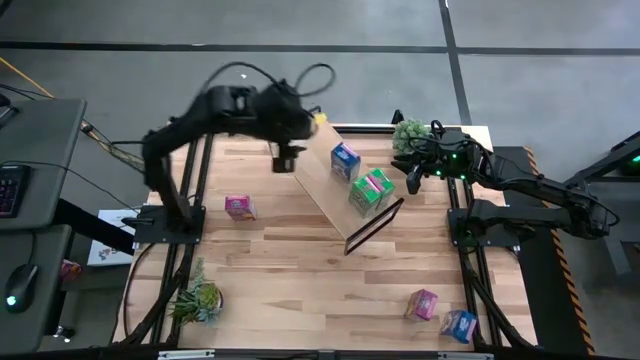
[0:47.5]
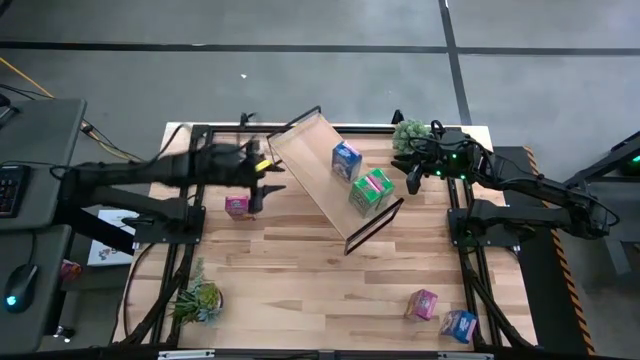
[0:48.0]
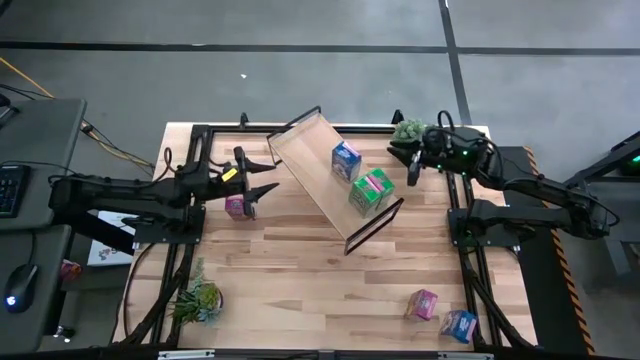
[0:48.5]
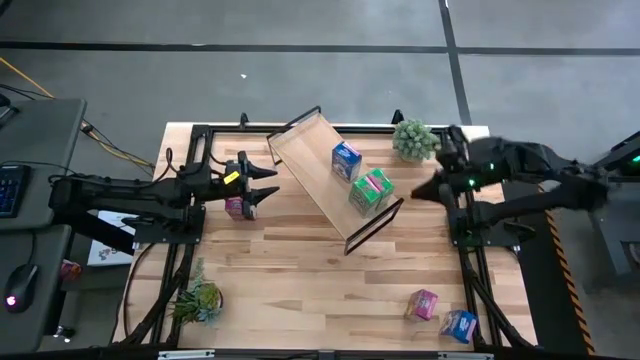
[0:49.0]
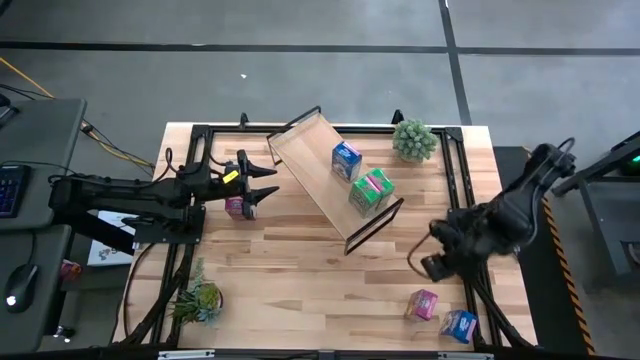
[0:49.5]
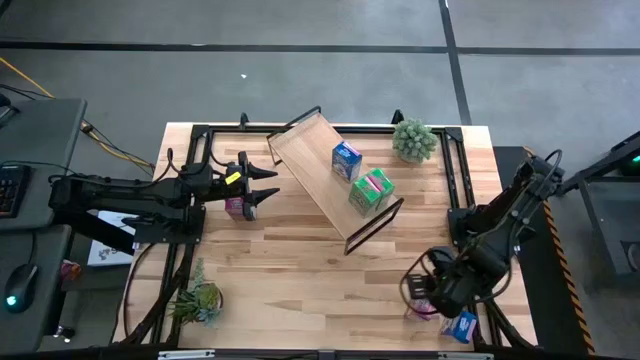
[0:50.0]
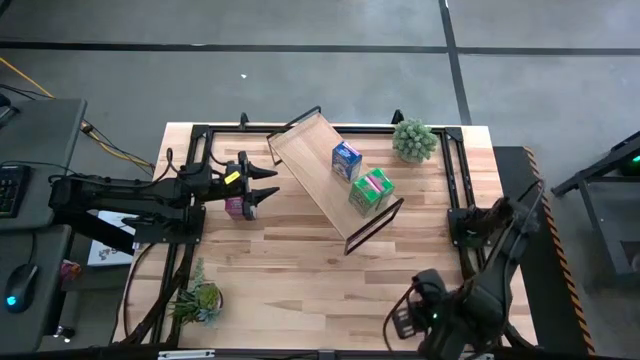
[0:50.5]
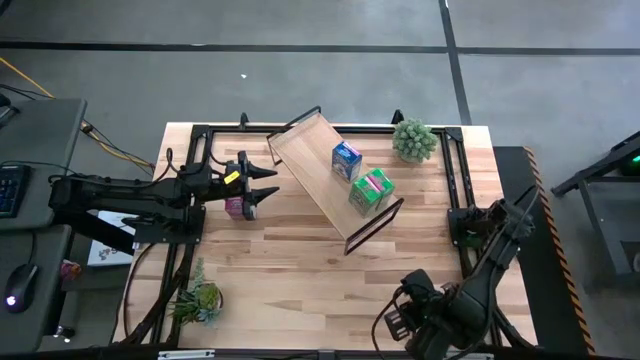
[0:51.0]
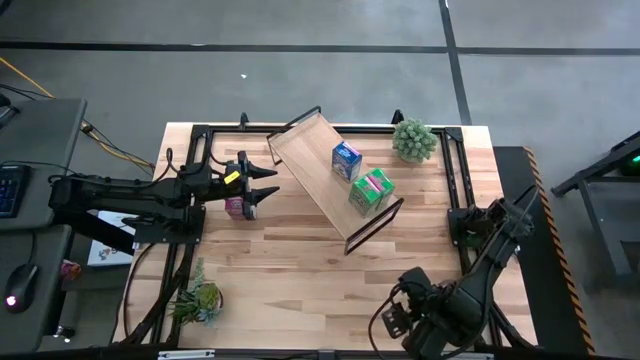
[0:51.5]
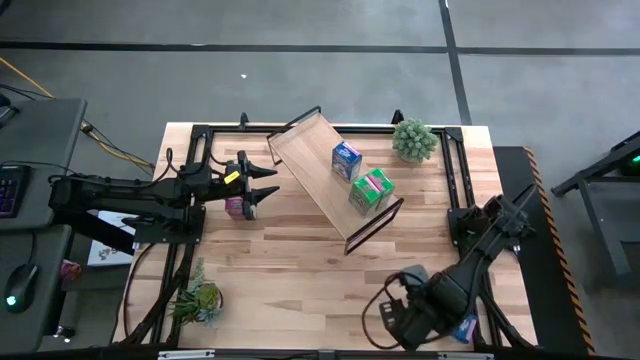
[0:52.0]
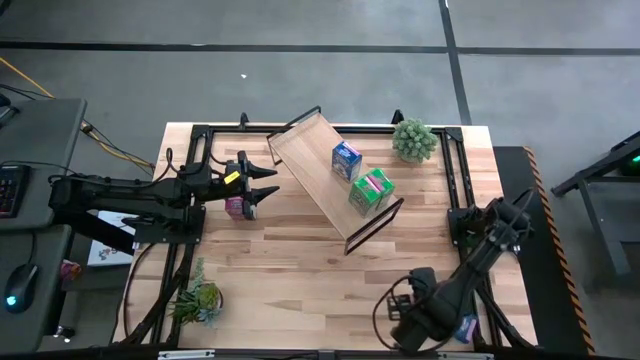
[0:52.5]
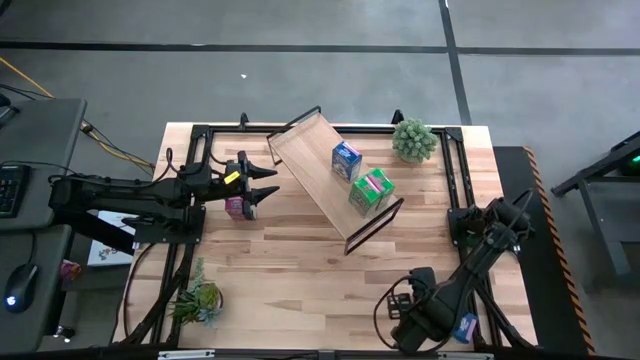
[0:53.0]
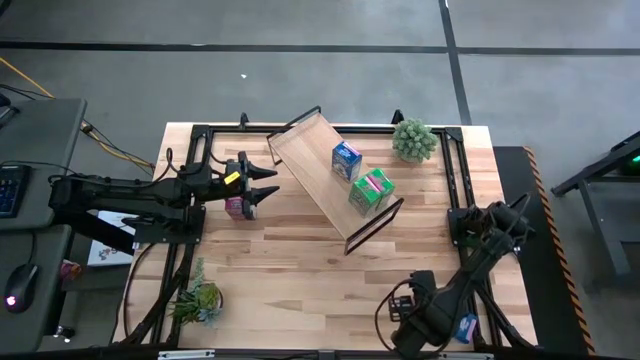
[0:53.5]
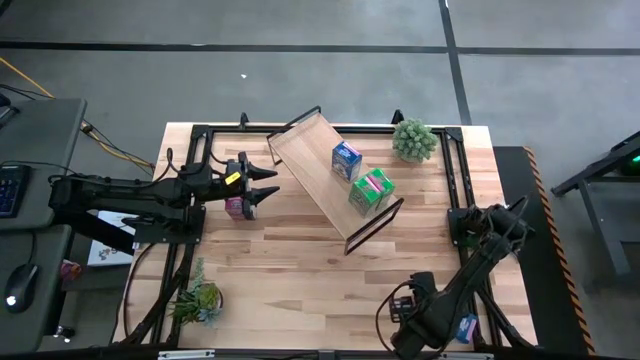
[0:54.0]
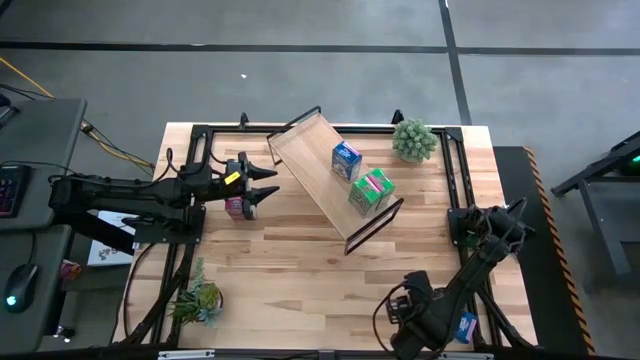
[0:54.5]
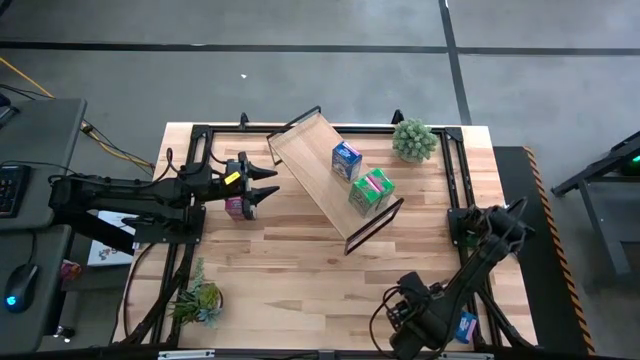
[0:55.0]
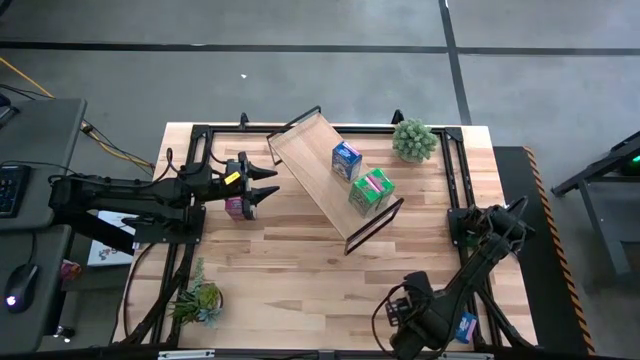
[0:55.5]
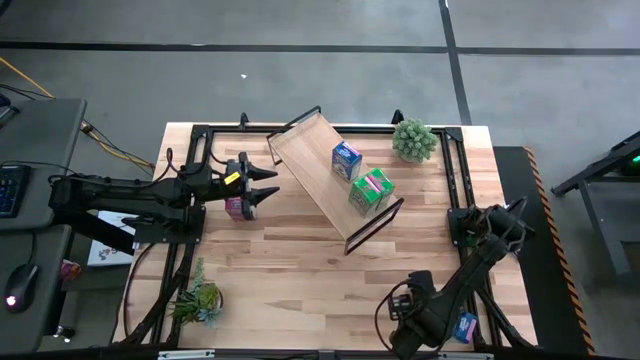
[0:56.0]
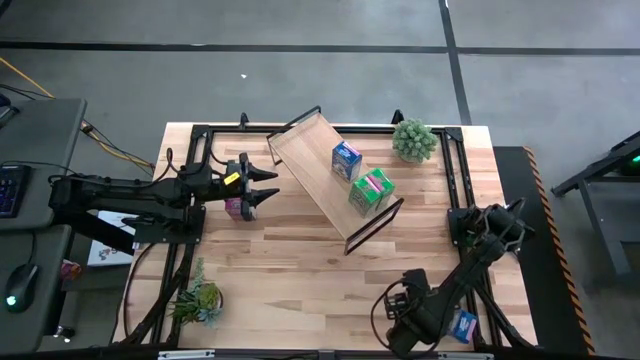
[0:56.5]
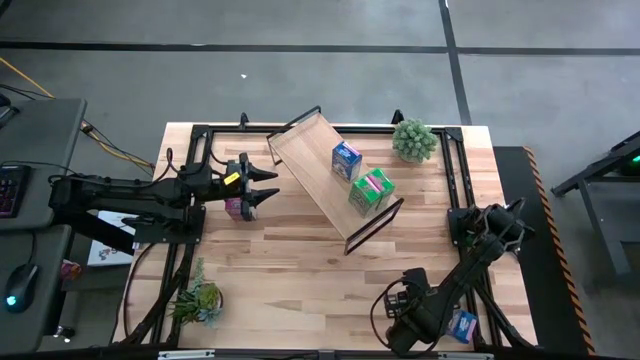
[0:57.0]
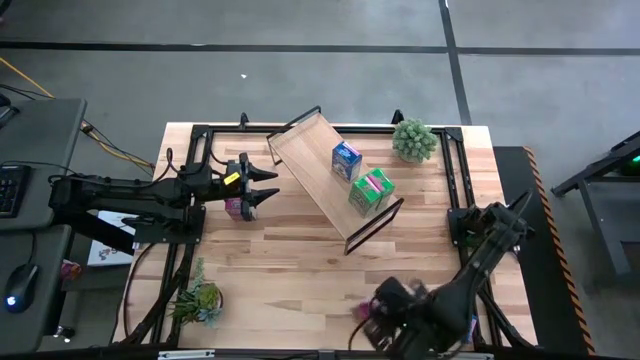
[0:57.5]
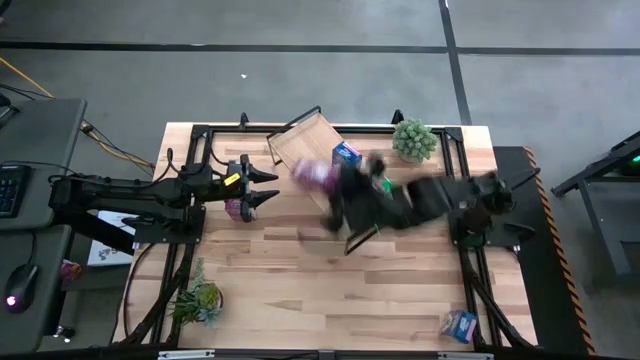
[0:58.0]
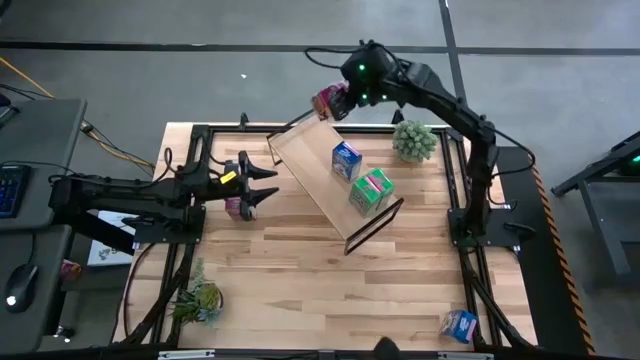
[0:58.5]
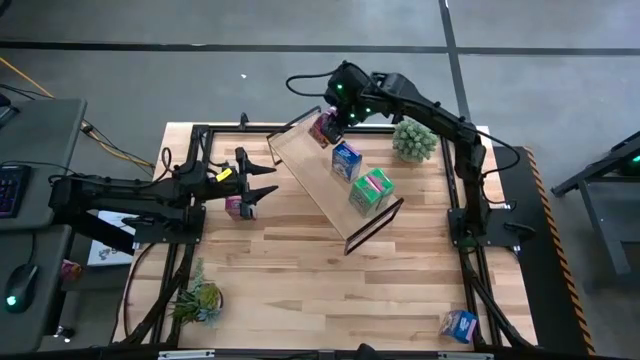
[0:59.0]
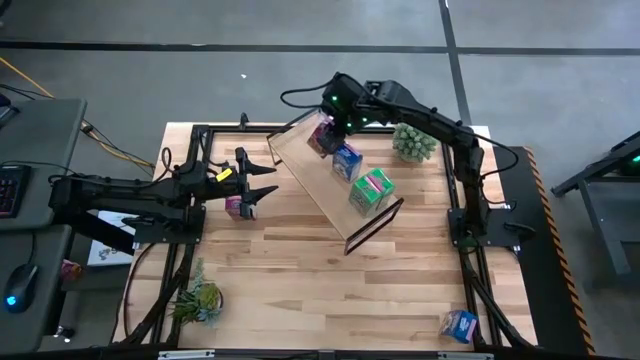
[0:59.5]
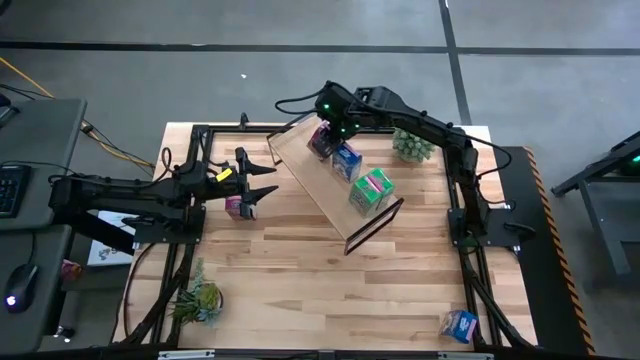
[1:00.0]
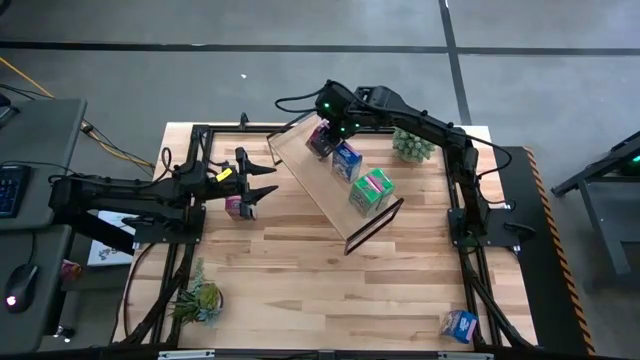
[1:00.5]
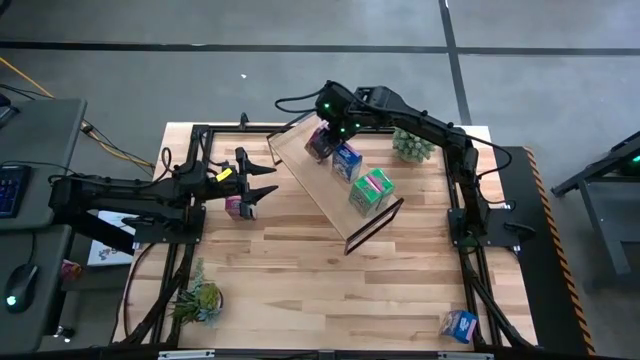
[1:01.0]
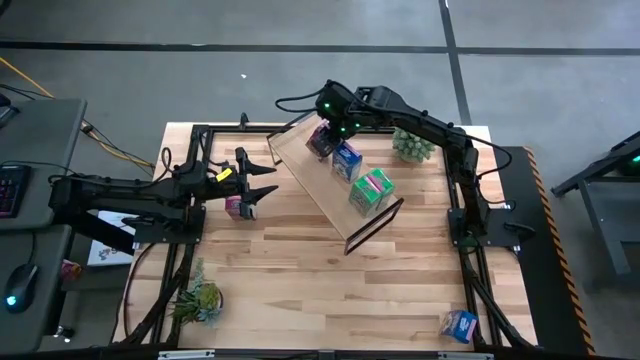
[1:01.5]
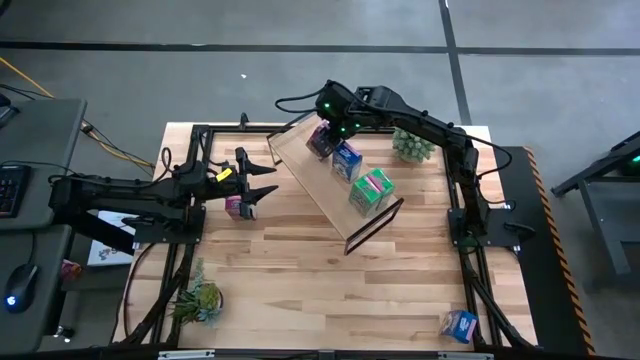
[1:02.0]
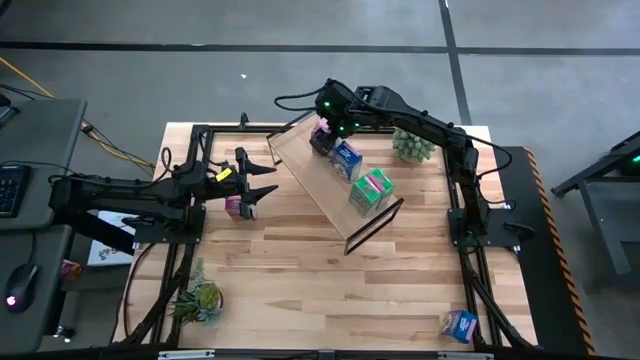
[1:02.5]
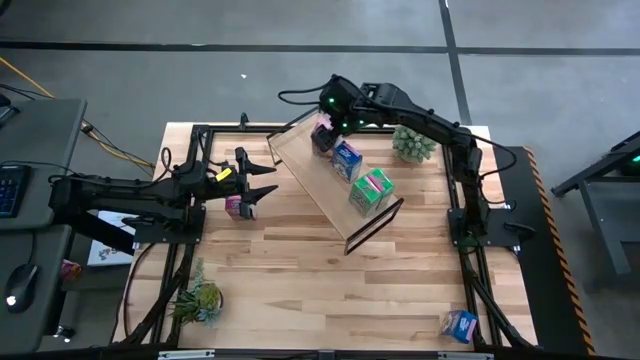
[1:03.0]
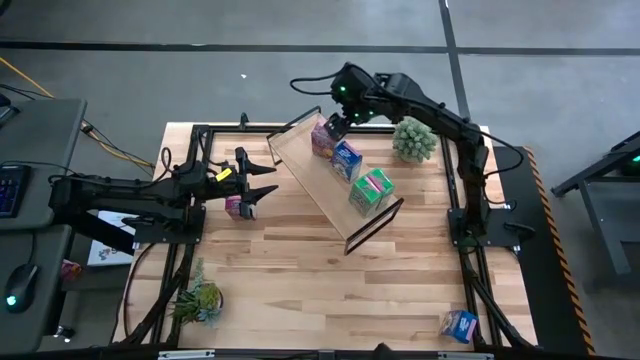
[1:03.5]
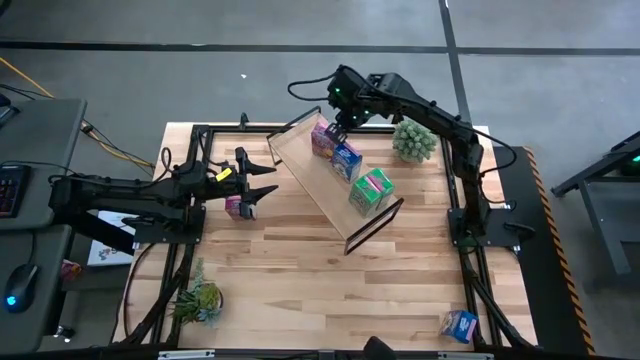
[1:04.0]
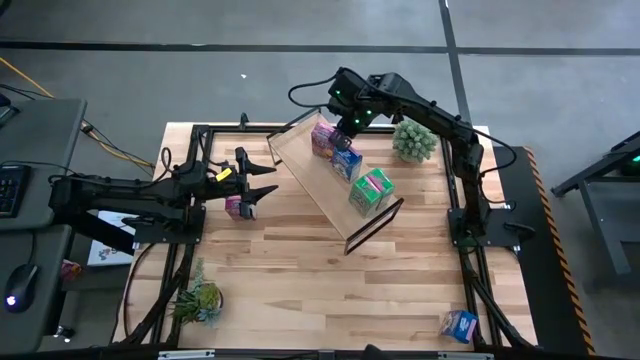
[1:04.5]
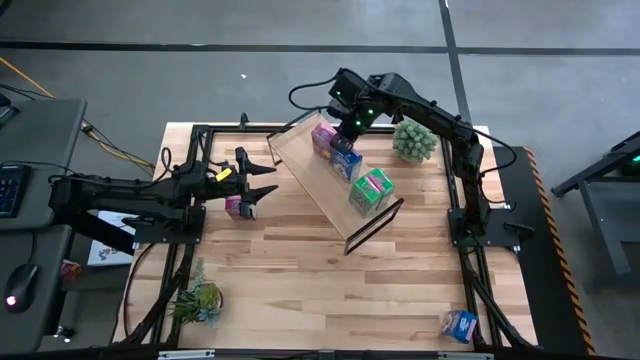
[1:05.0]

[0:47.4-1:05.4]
Task: Stack cereal on shelf
Put the bottom purple cereal box on the shelf

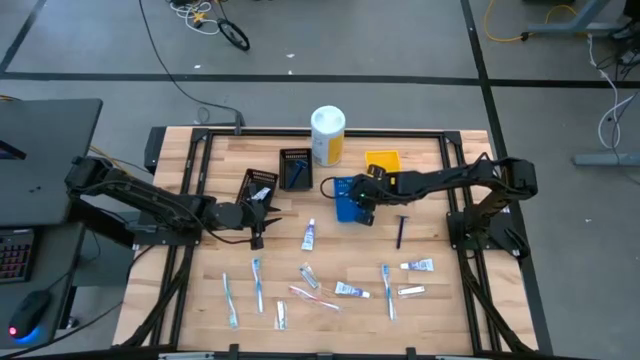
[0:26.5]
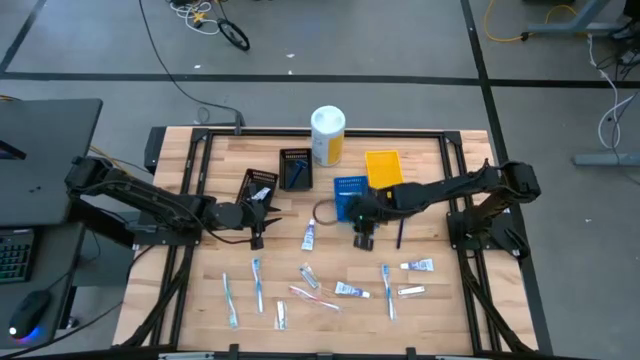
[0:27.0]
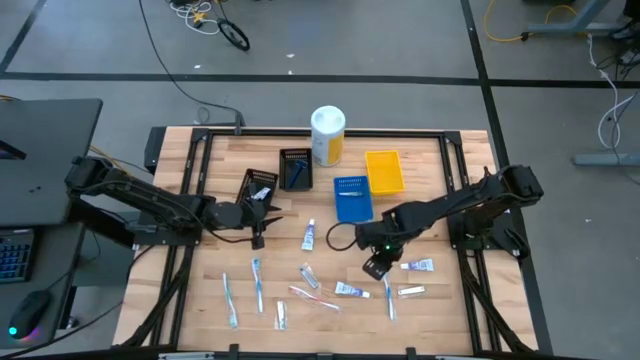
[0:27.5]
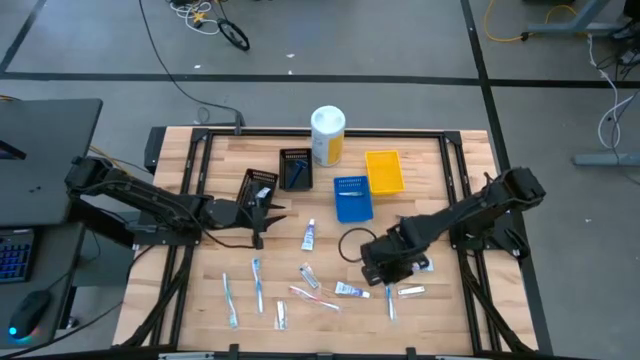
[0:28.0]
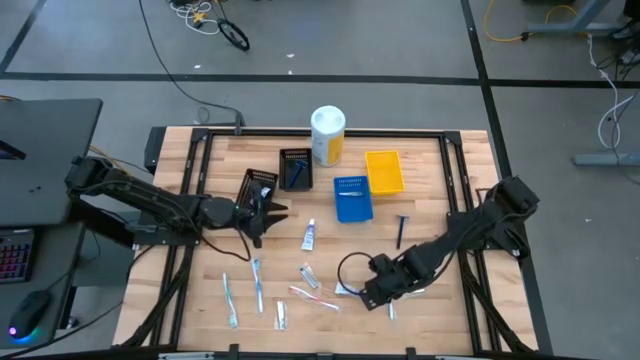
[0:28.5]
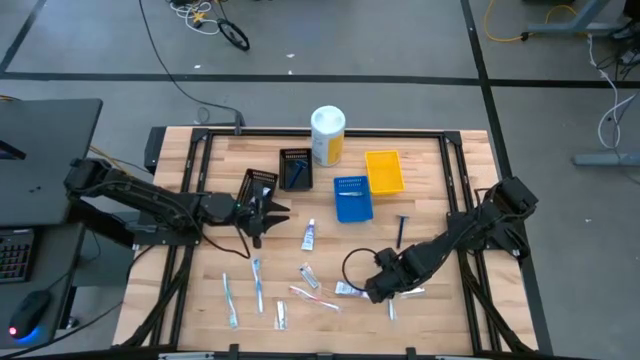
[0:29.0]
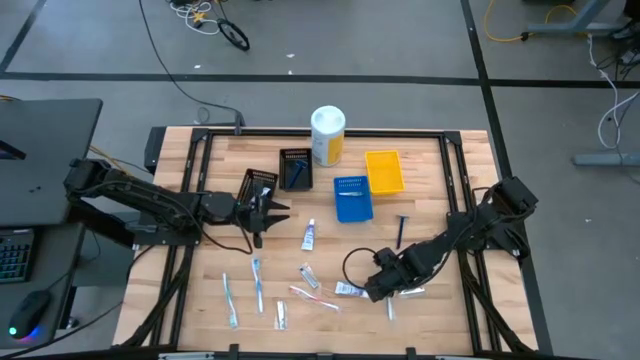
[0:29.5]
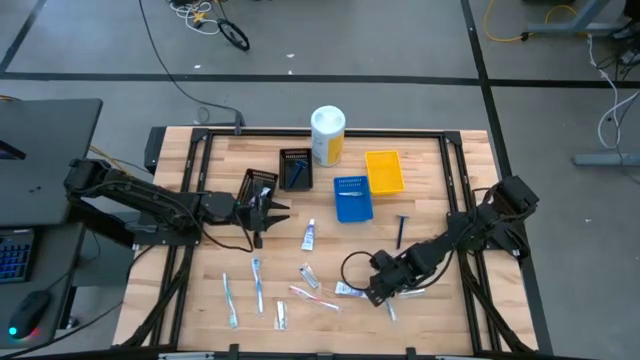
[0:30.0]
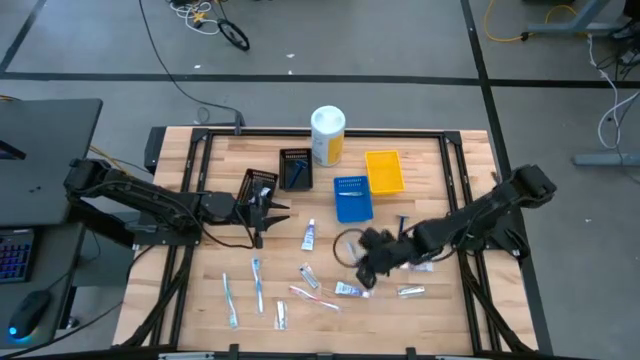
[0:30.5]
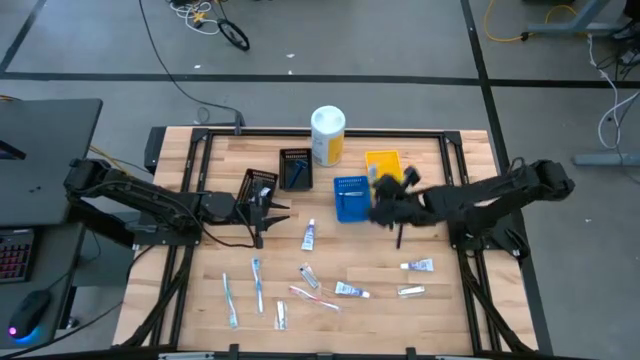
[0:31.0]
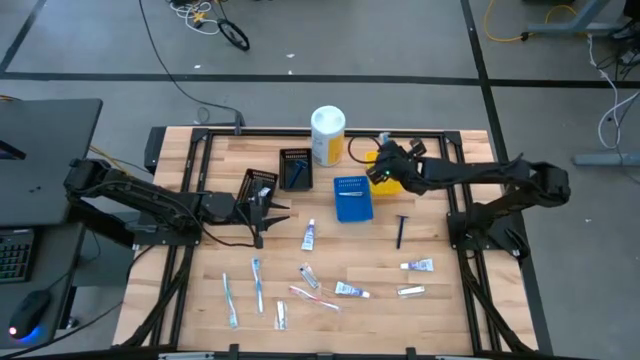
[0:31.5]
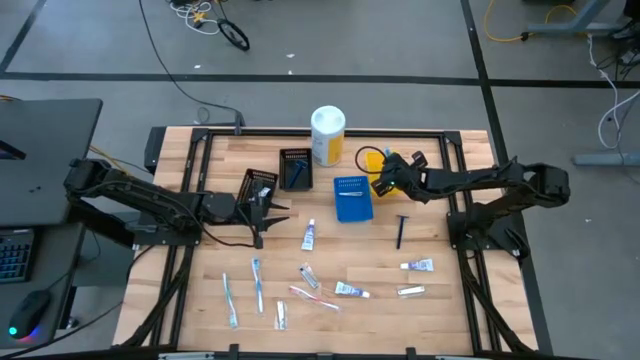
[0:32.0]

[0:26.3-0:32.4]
Task: Pick & Place Travel size toiletries
Put the blue toothbrush into the yellow bin
